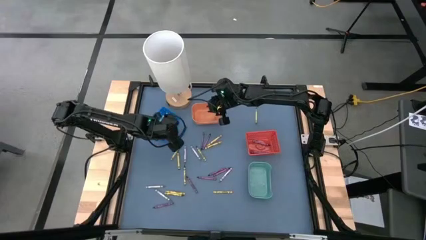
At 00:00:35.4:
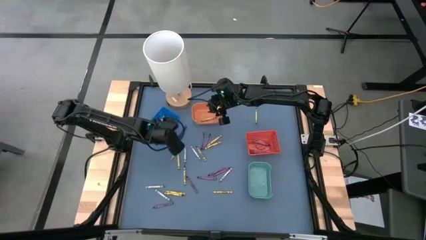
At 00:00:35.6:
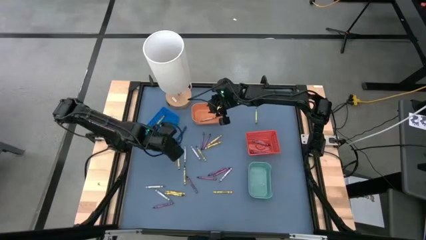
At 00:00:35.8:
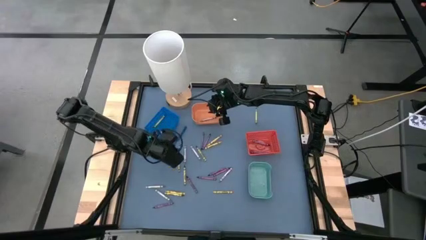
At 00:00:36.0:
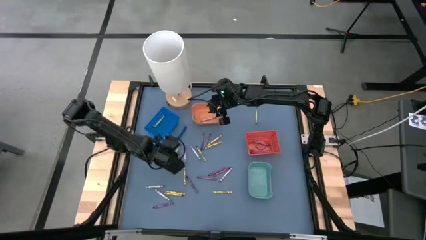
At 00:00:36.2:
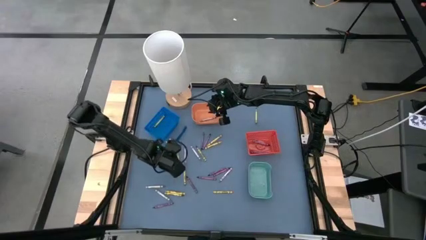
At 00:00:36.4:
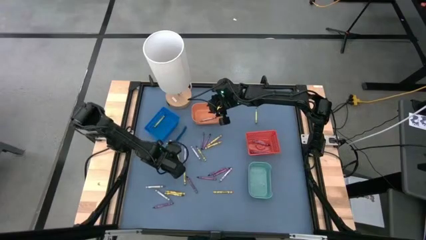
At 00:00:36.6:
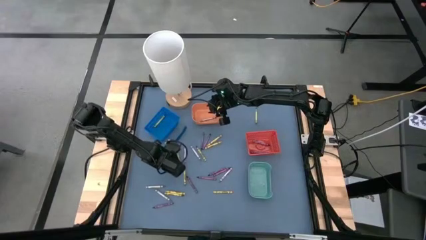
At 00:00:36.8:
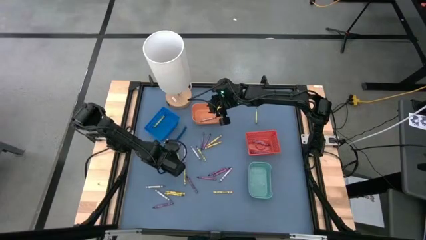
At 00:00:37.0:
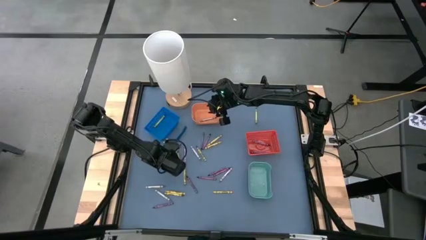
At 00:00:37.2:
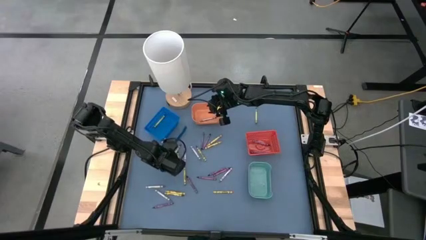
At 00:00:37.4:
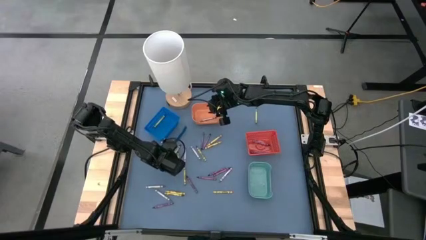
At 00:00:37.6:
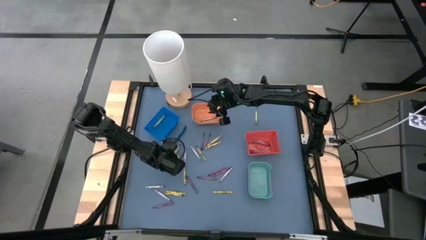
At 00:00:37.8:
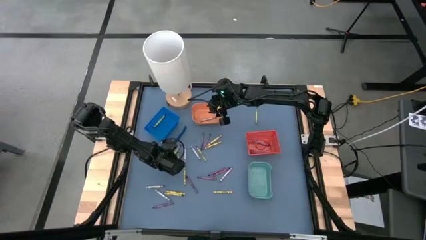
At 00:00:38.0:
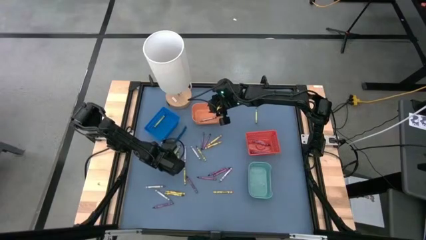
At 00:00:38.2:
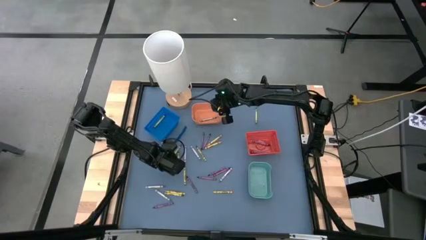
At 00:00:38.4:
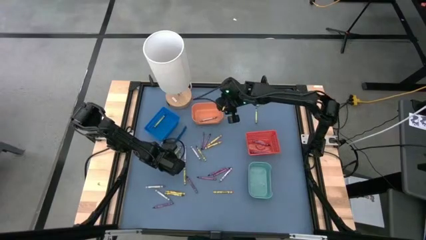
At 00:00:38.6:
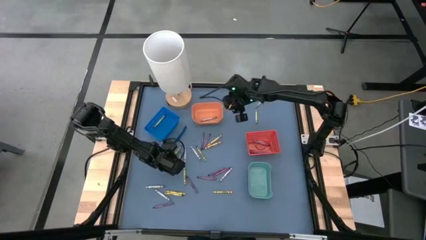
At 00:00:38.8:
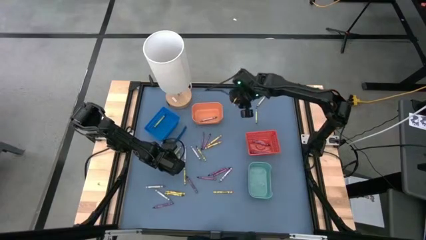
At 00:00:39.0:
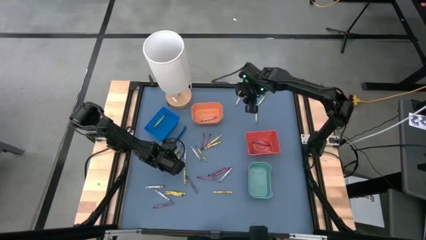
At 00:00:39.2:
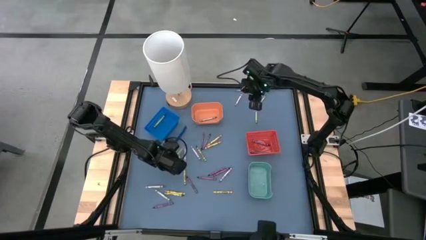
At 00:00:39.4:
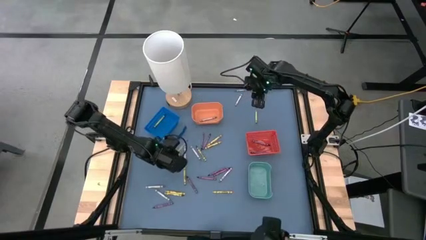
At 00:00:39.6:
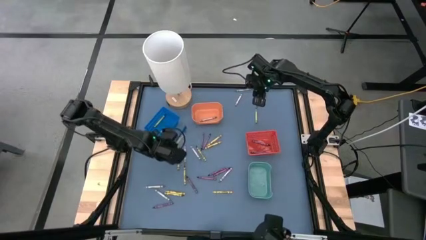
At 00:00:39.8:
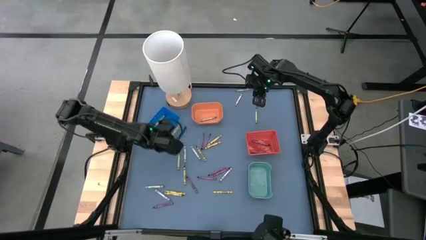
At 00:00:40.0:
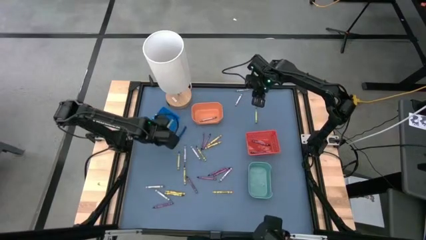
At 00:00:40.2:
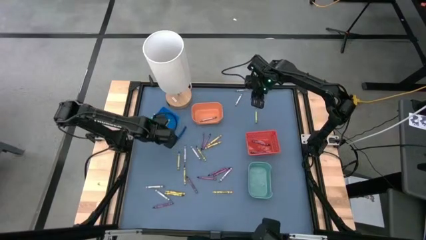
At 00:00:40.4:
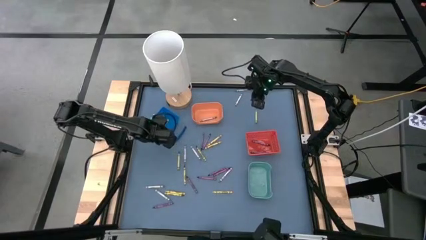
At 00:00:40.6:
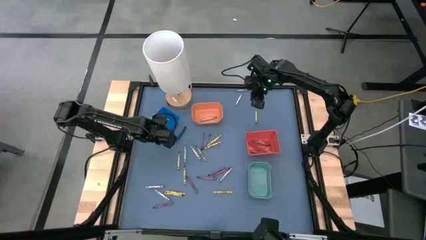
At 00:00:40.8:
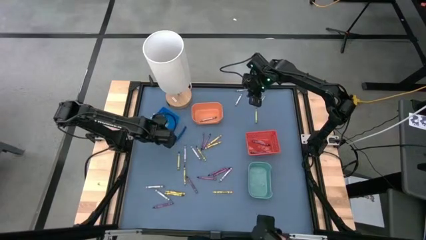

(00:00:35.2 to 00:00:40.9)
Task: Sort crayons
Put the green crayon into the dark blue bin

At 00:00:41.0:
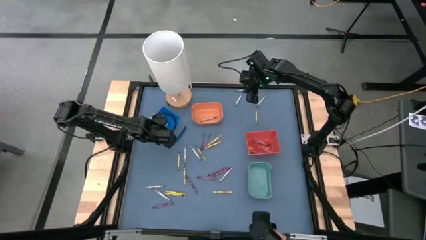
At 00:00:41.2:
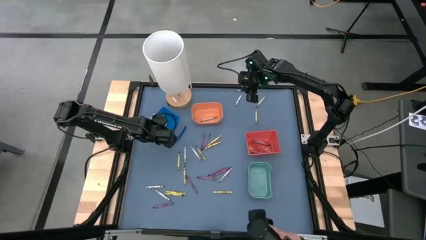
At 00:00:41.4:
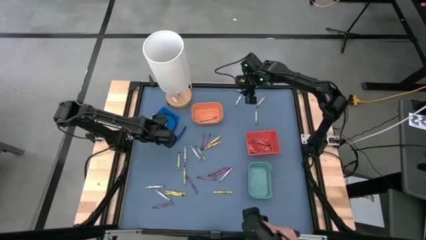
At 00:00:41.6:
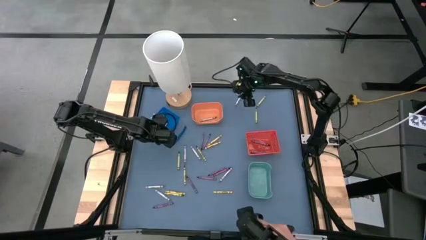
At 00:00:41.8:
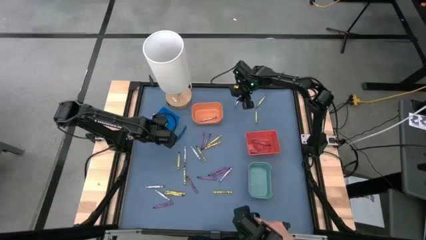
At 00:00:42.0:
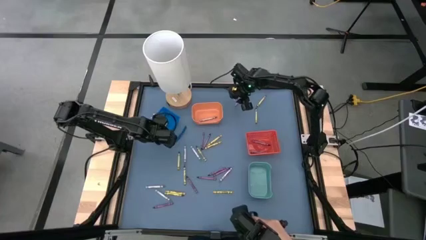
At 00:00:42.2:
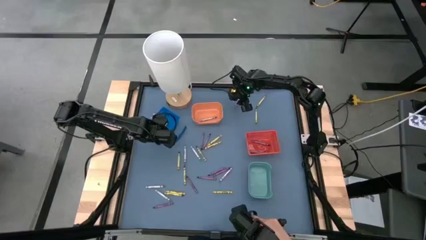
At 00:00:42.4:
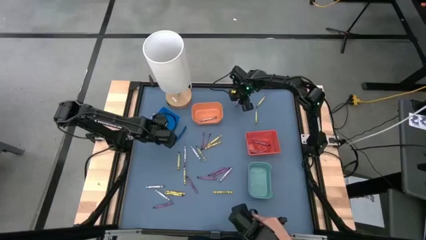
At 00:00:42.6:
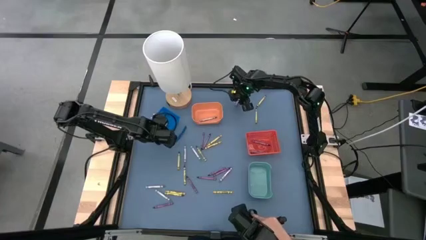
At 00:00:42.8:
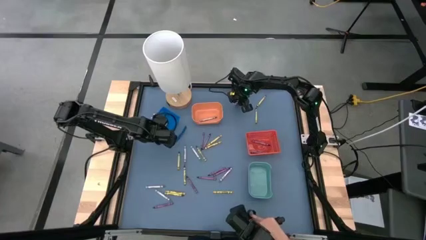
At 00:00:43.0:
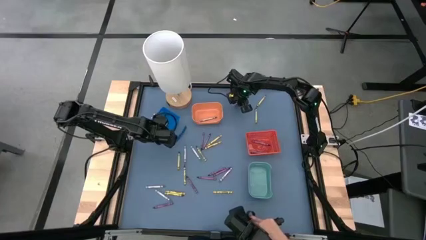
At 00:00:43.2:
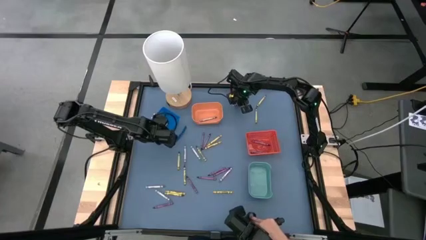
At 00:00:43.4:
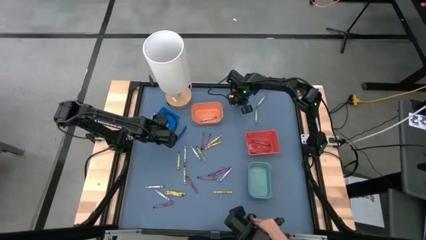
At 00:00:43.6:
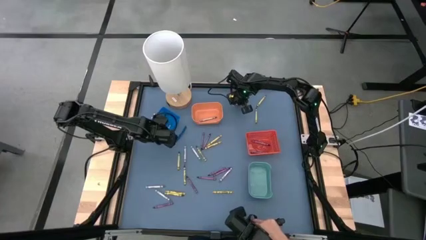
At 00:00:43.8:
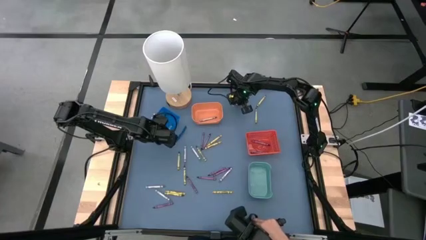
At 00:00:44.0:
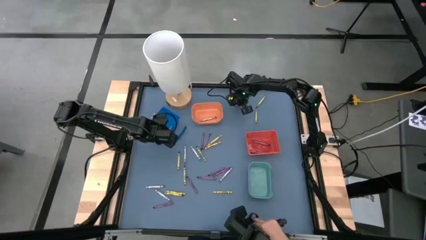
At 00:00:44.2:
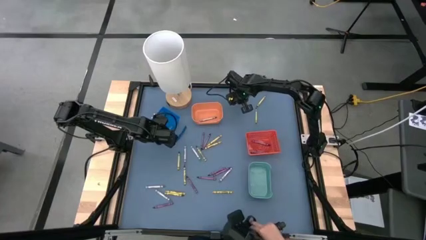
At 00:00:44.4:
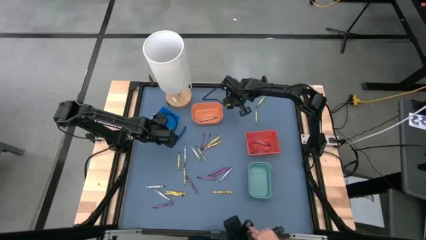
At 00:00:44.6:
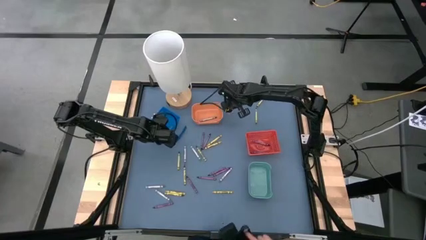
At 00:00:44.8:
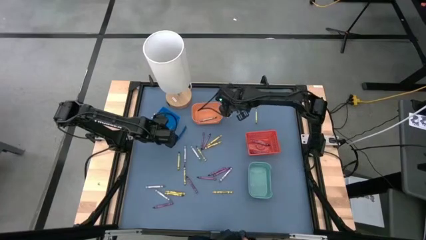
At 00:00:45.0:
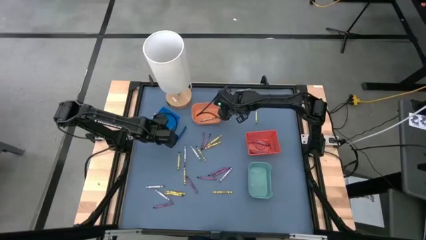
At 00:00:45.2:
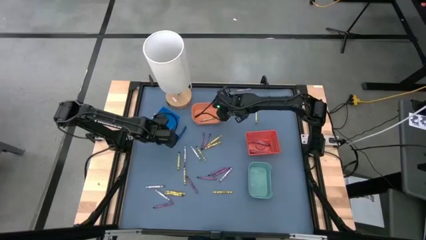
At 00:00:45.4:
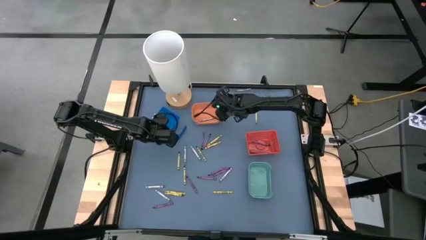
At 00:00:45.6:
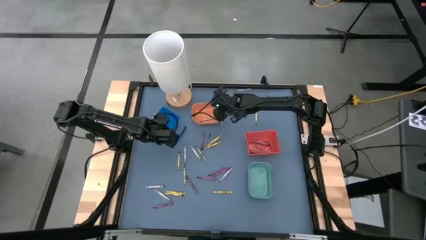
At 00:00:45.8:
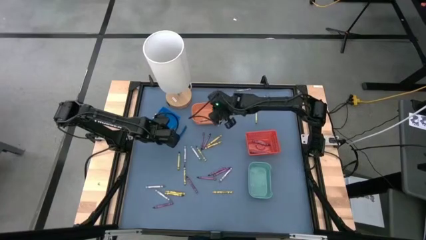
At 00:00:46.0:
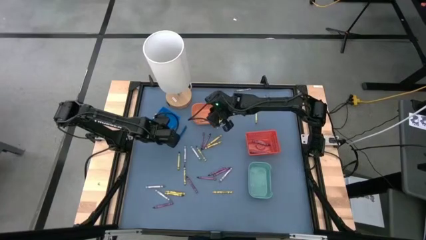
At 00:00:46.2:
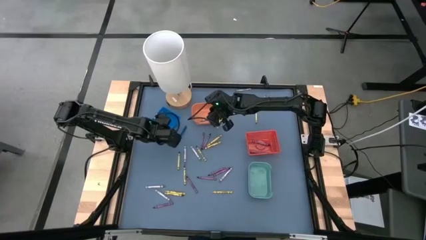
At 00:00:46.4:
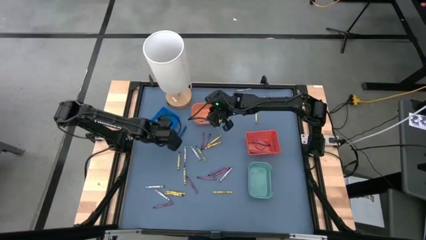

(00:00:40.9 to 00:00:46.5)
Put the gray crayon into the orange bin
